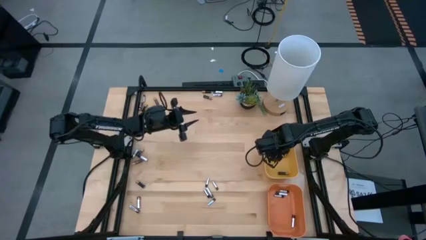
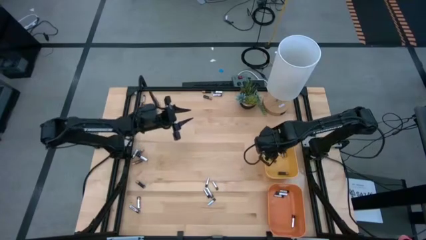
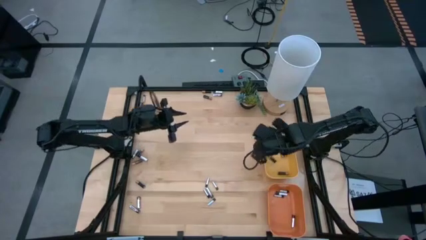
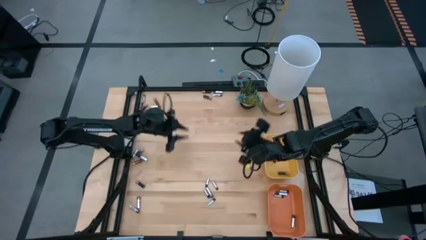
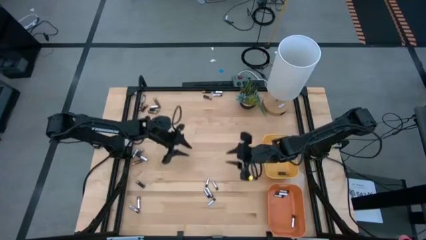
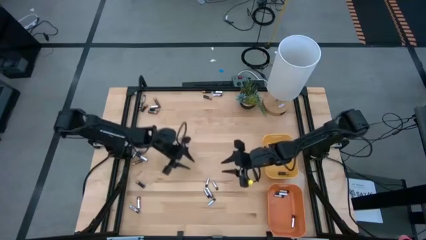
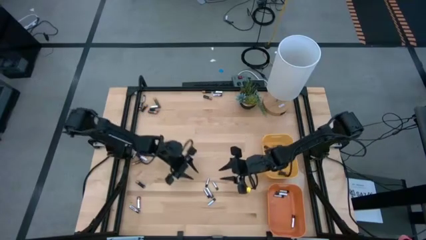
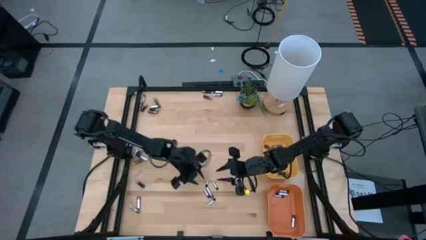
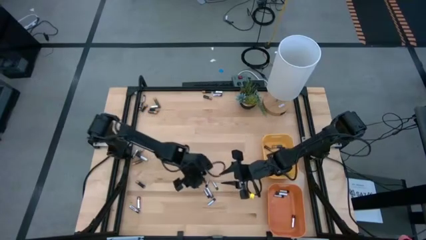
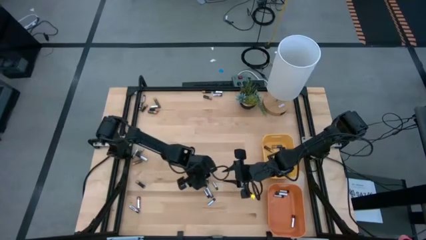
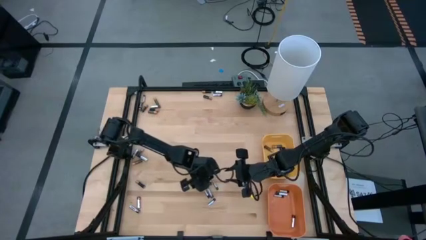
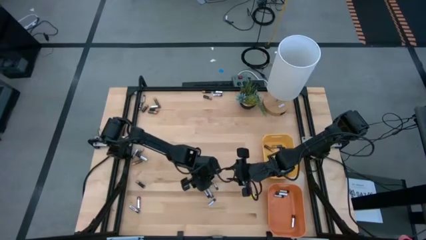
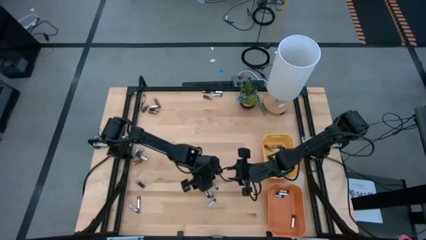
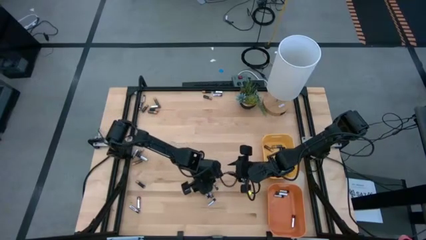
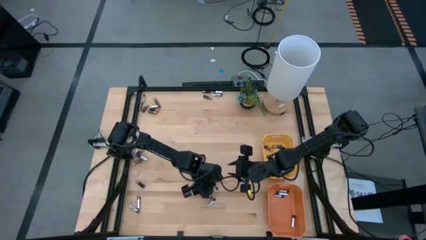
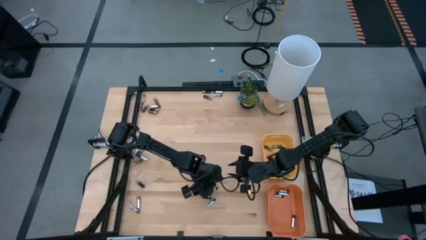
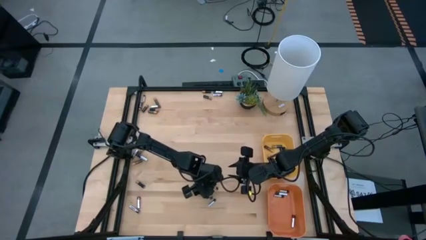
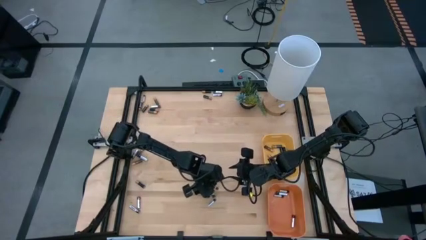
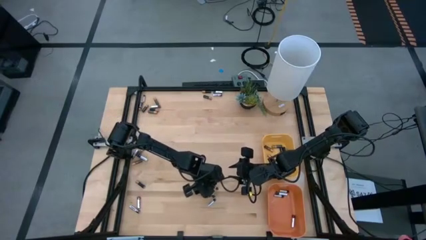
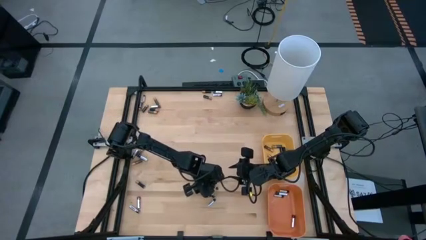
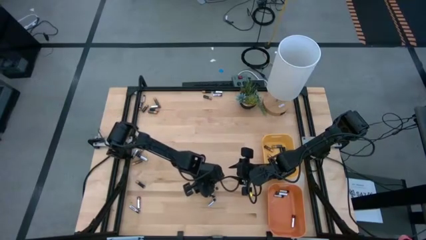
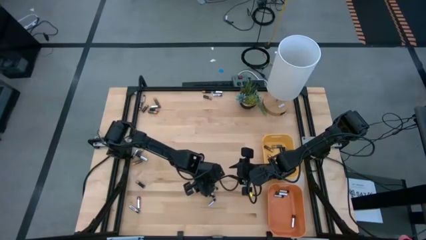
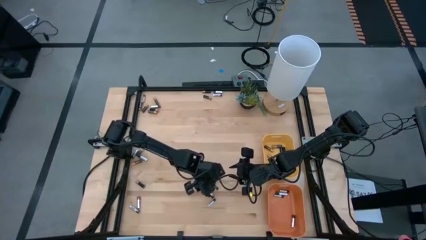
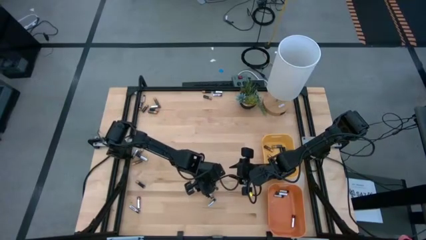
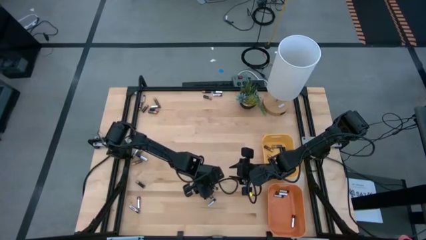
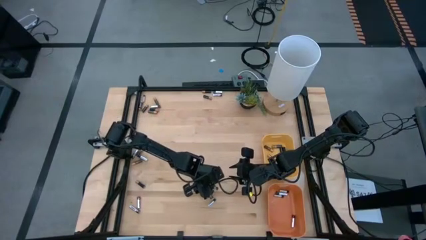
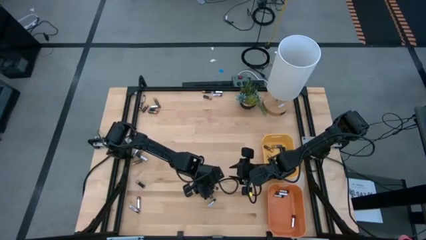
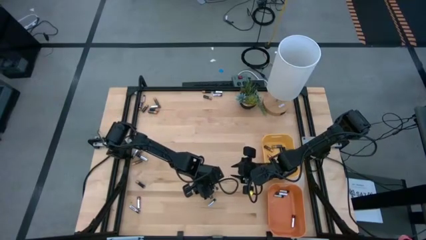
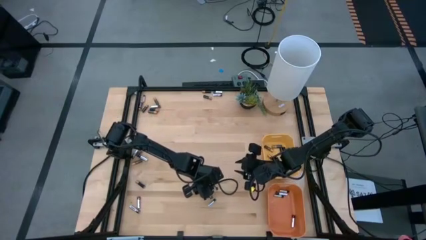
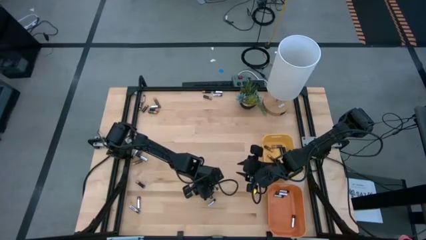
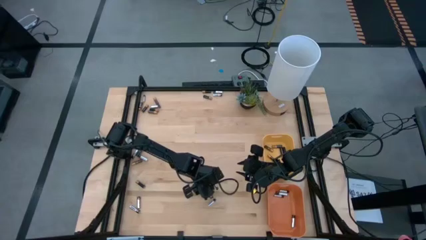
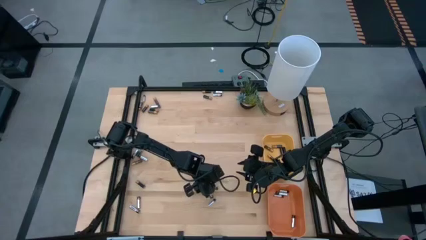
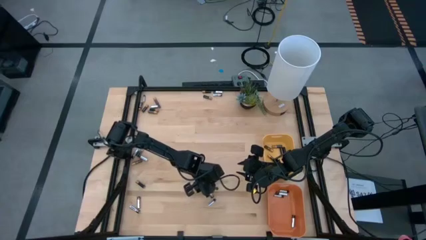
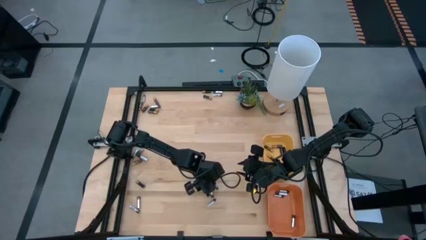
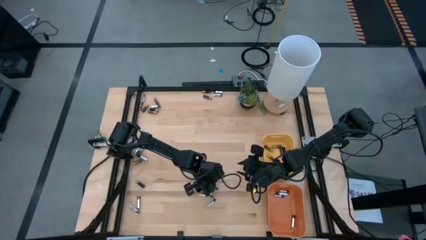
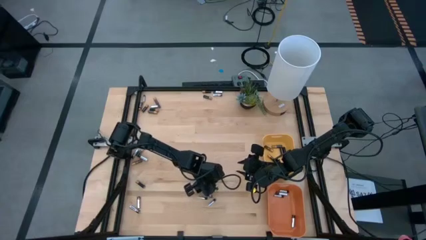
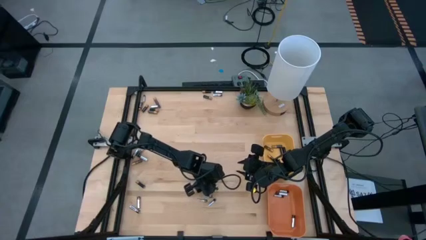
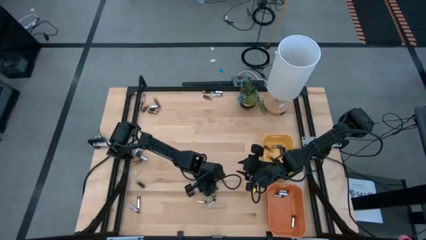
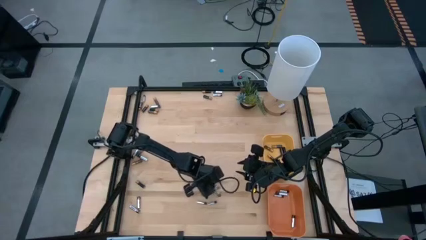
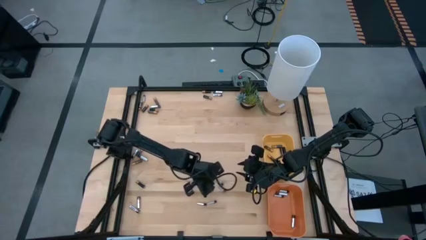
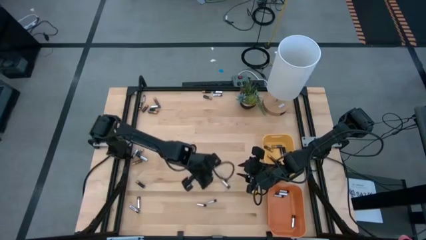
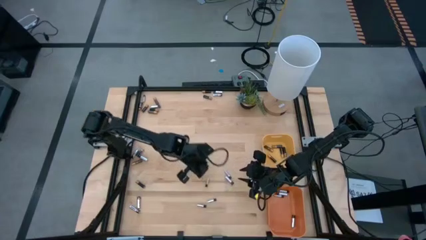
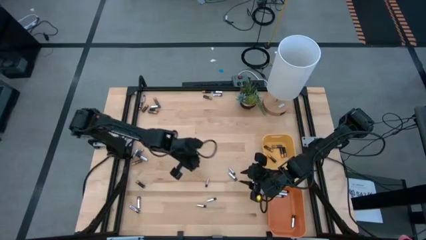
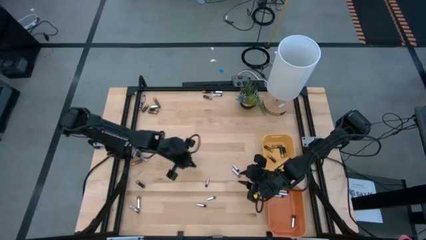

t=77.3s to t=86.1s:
Task: Sort batteries
Put the black battery into the orange bin

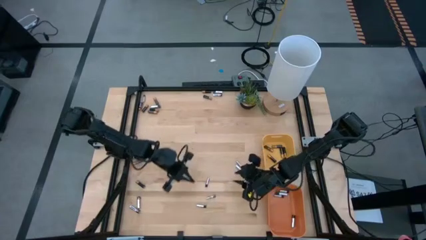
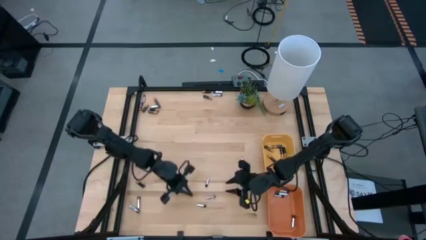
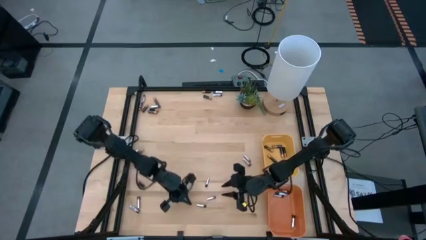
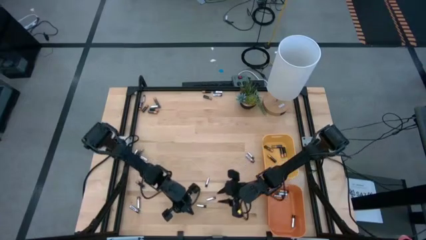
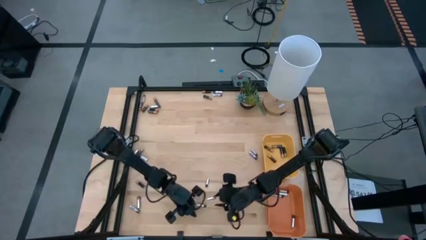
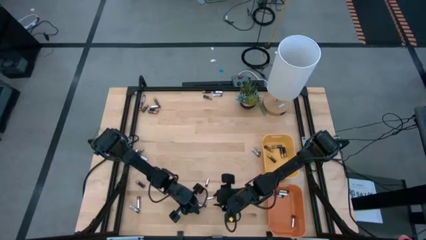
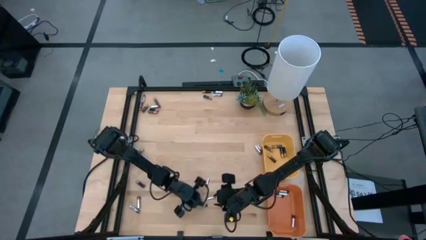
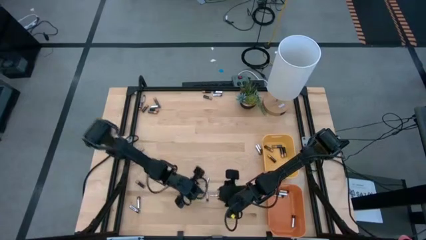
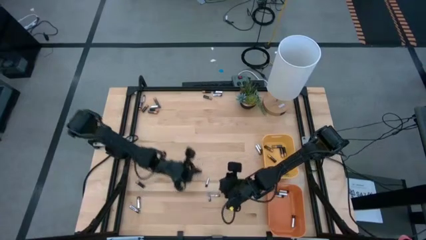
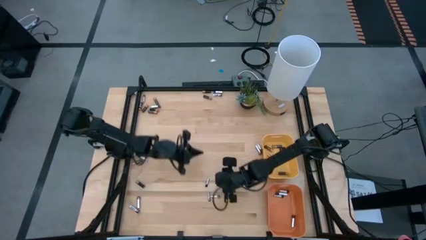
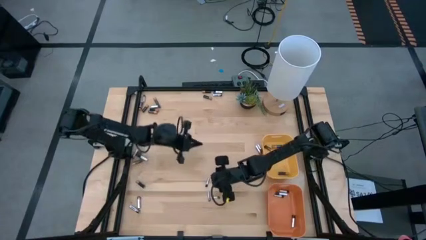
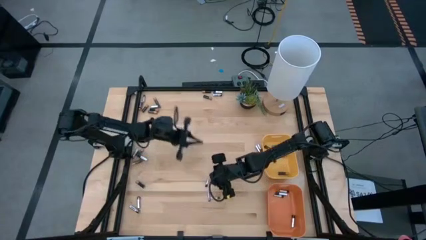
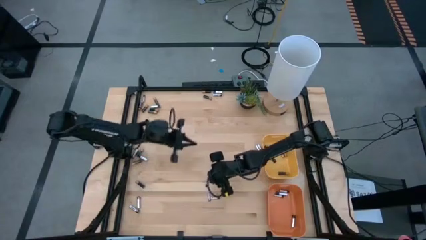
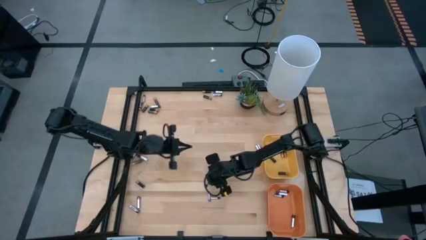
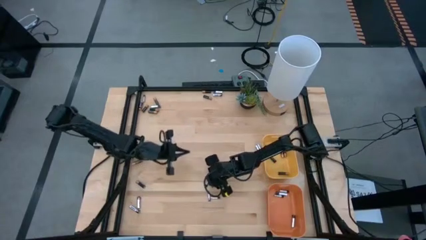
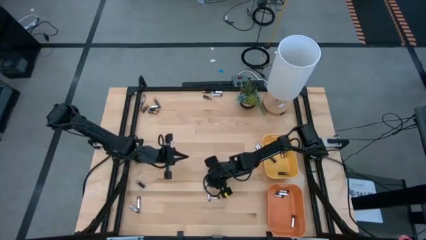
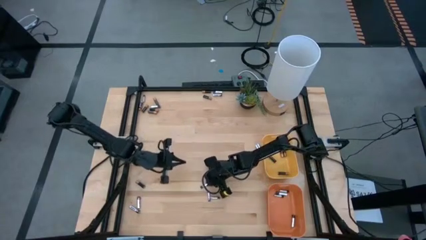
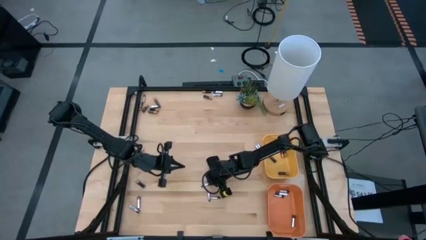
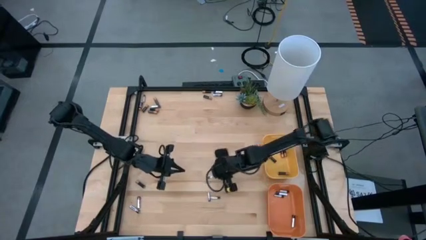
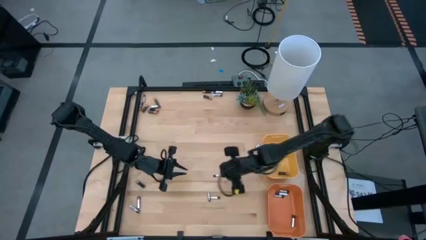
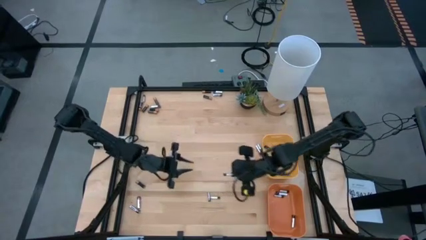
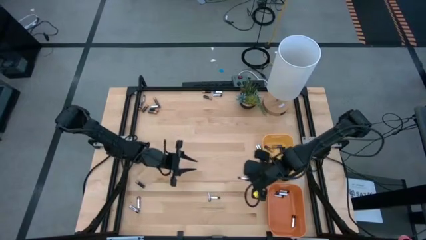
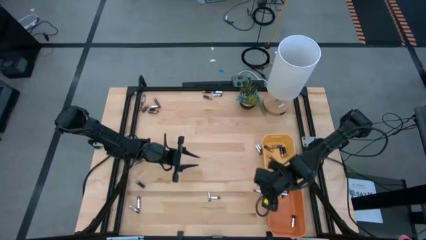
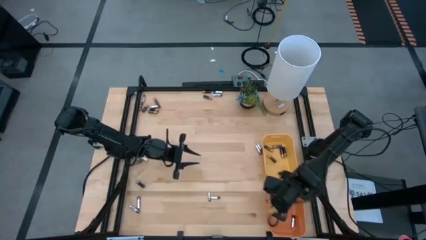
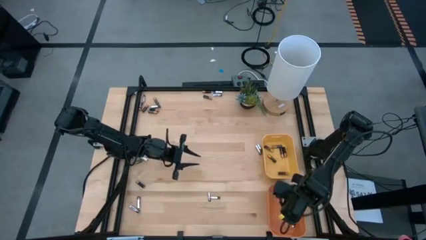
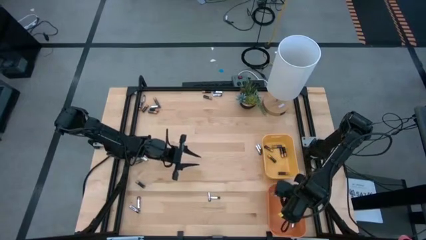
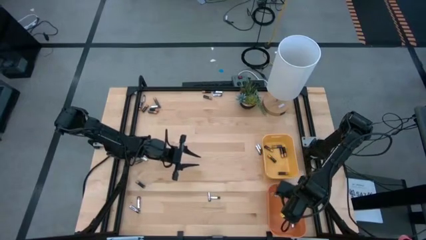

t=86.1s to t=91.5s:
Put the black battery into the orange bin

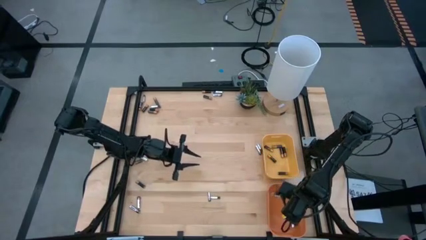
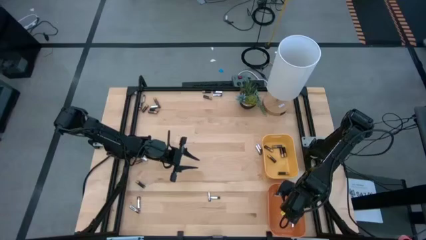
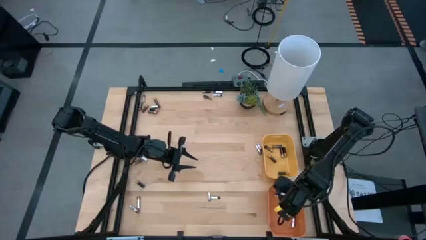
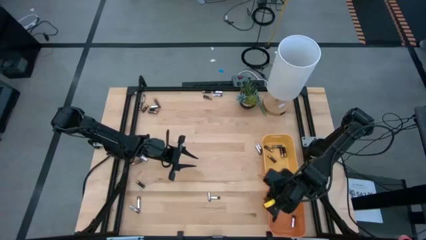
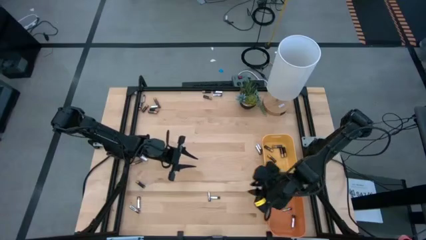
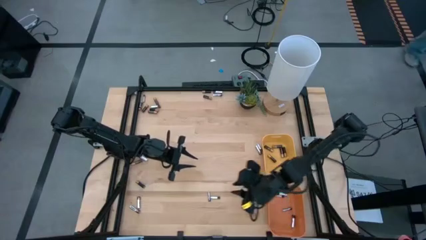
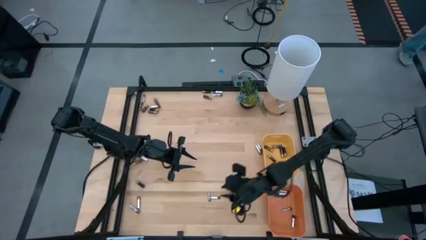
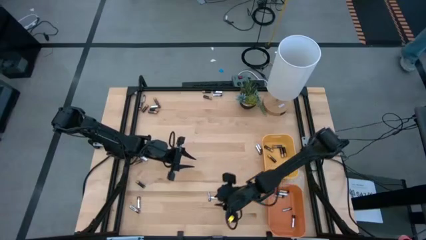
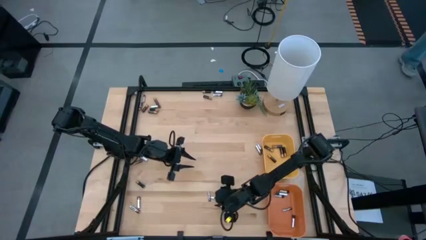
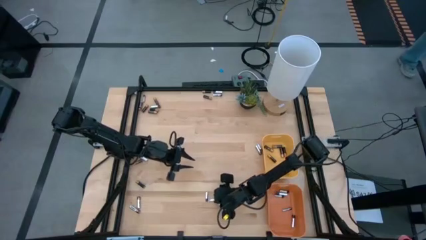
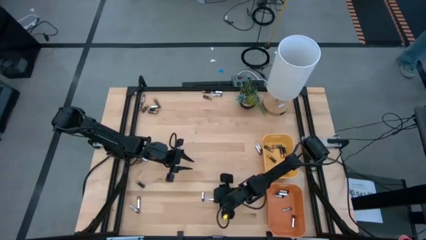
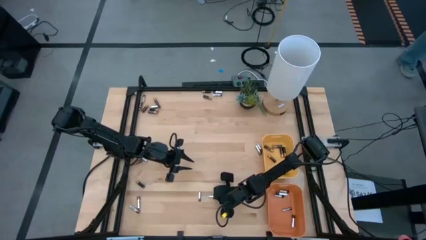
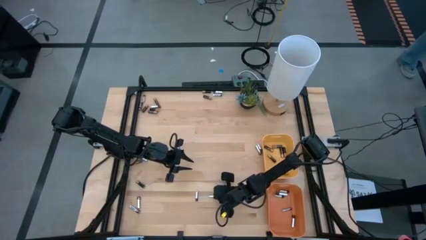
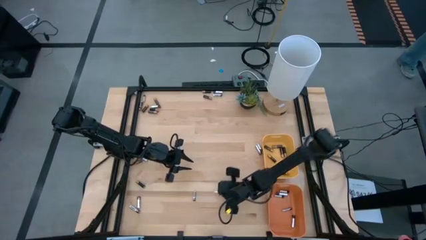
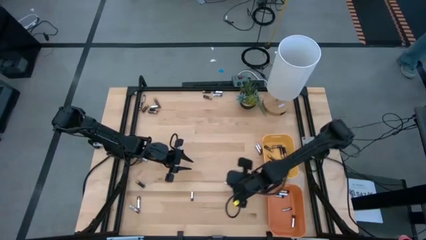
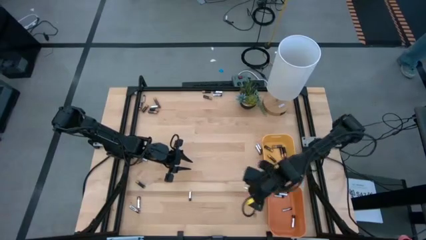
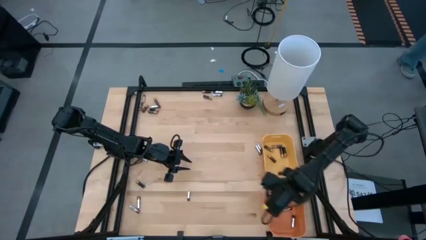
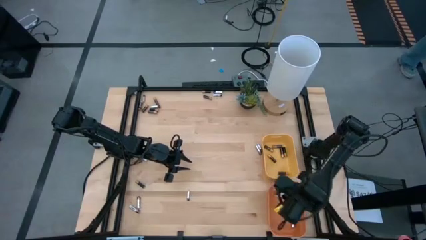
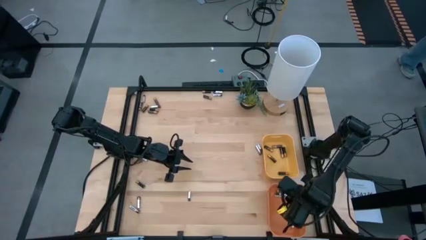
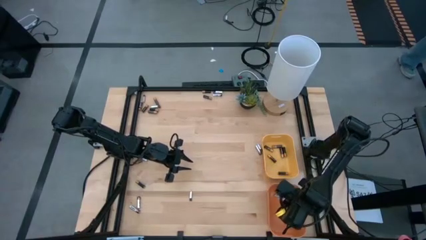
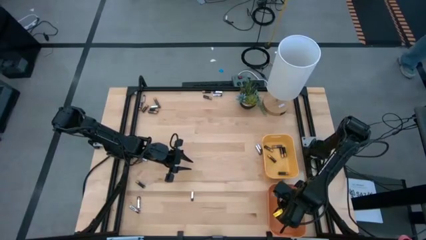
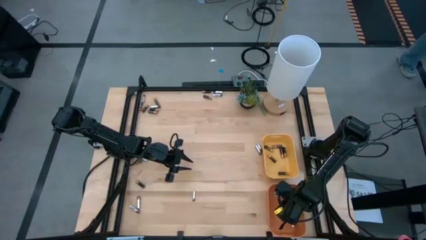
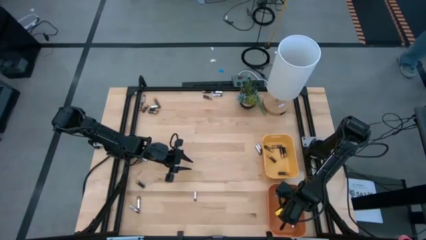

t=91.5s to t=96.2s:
Put the black battery into the orange bin
